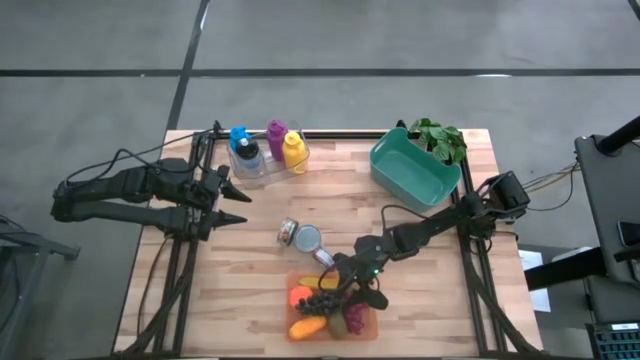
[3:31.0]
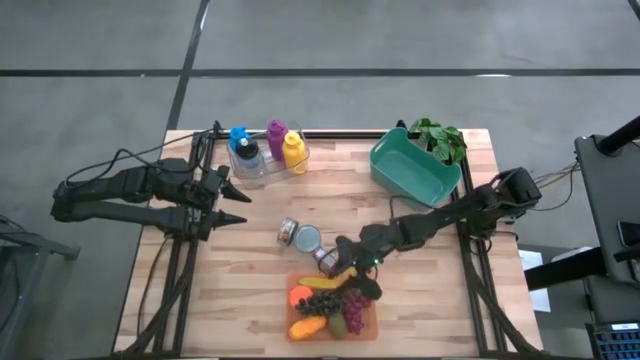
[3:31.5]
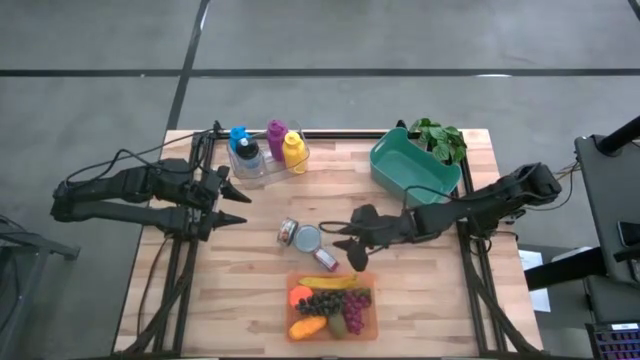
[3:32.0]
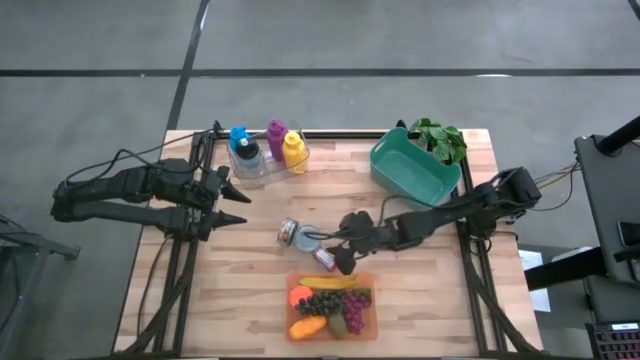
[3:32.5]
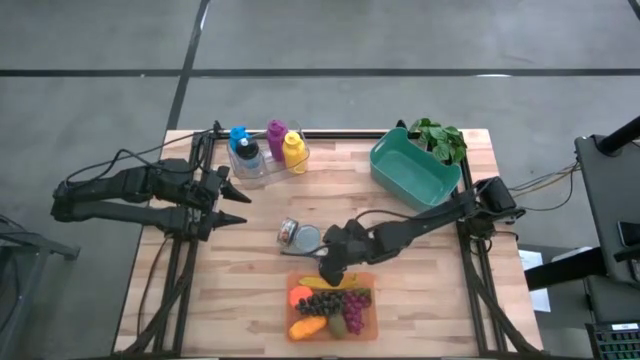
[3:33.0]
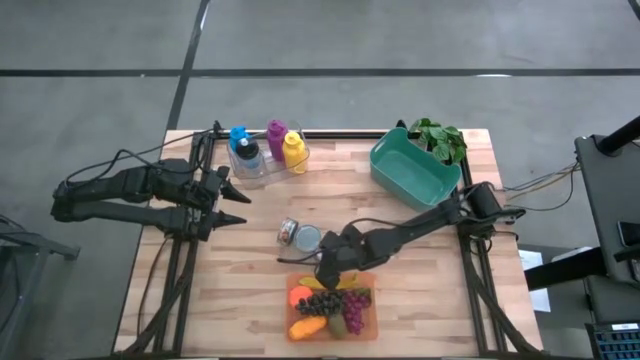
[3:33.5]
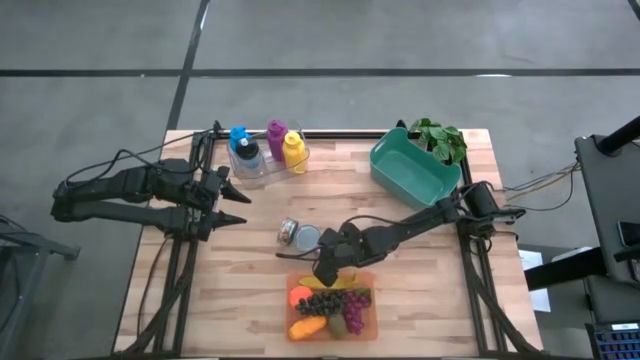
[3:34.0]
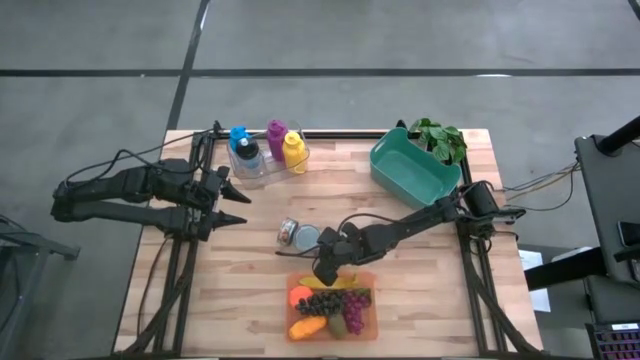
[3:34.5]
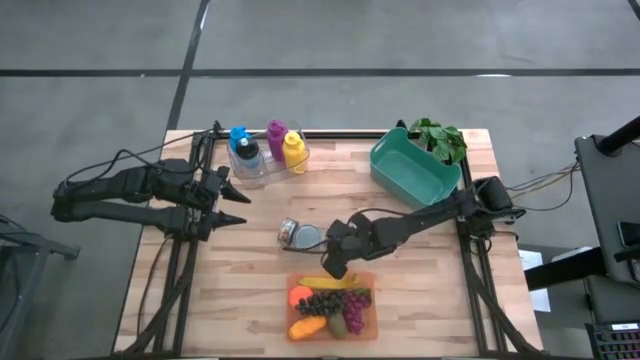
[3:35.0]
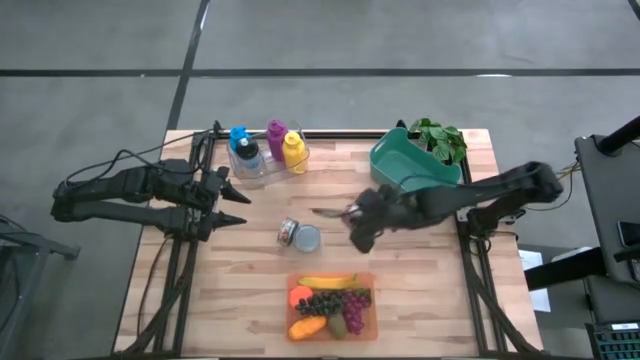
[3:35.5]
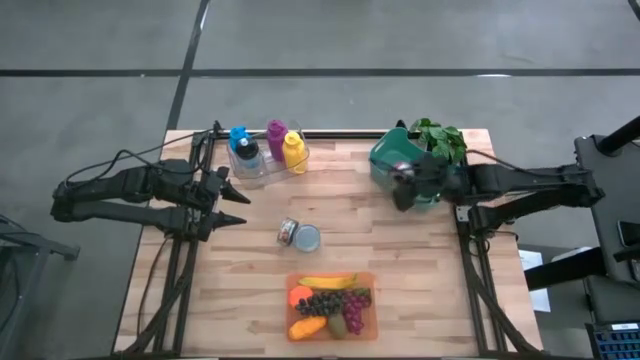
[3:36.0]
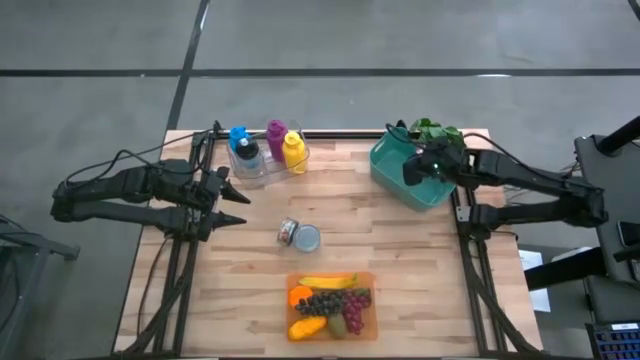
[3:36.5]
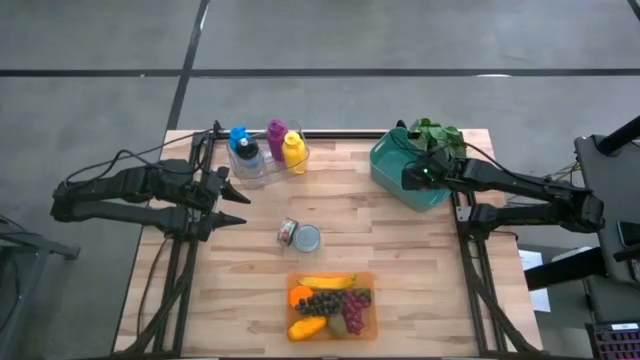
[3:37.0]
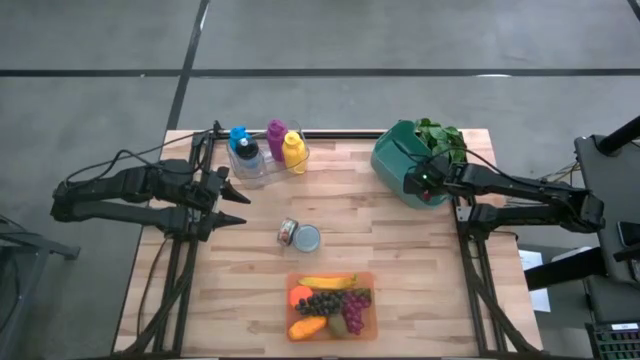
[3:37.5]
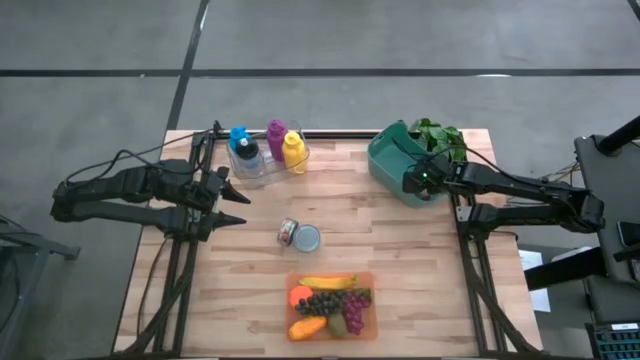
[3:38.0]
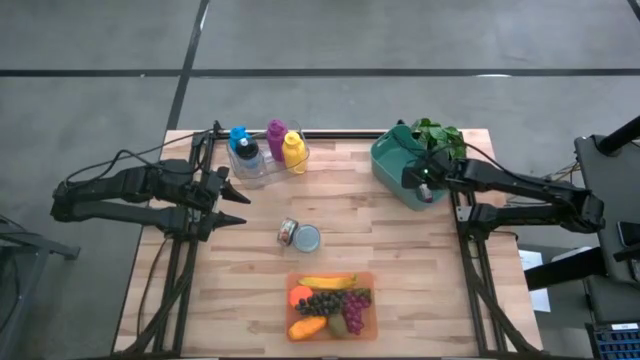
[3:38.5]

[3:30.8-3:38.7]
Task: Pick & Place Food Item
Put the red tuna can into the green bin

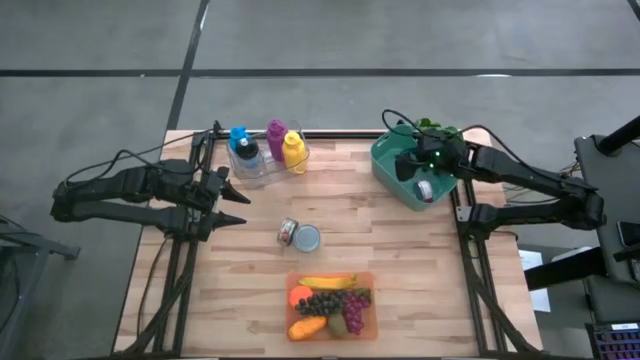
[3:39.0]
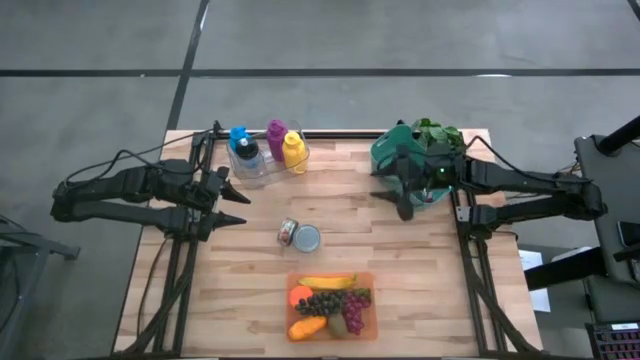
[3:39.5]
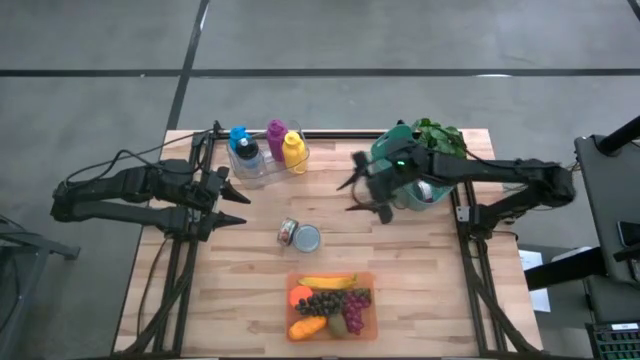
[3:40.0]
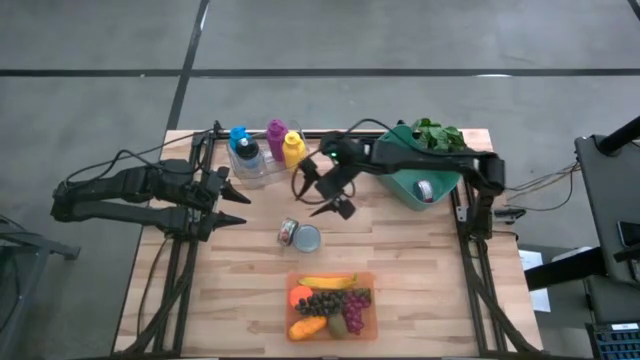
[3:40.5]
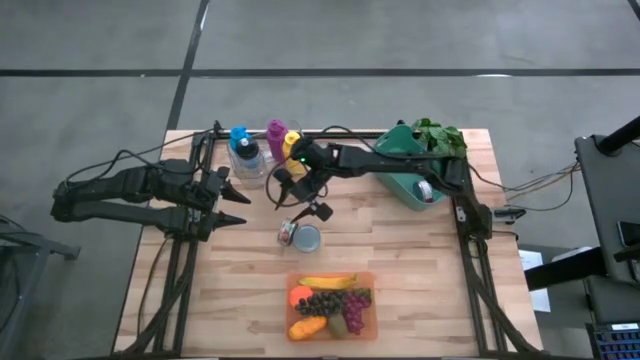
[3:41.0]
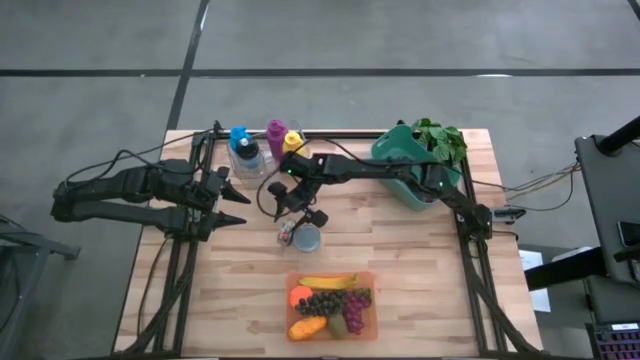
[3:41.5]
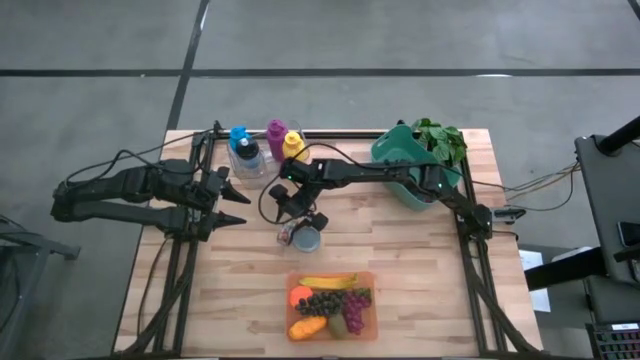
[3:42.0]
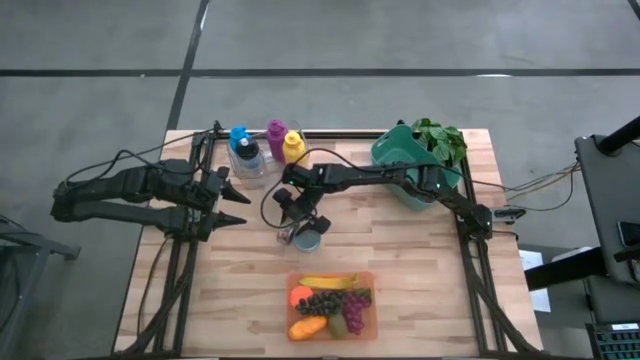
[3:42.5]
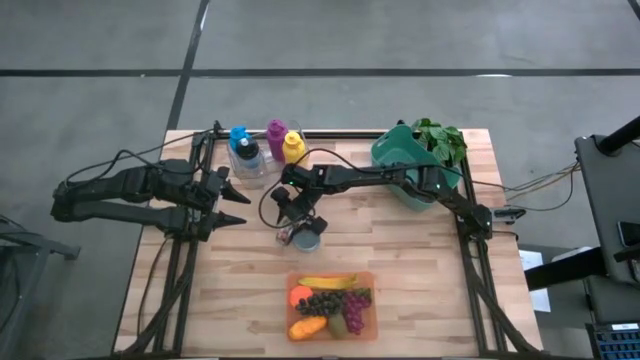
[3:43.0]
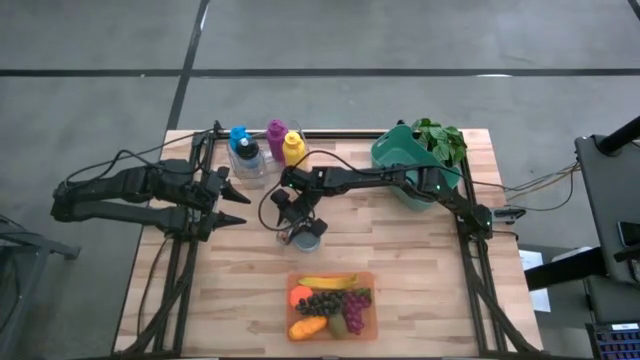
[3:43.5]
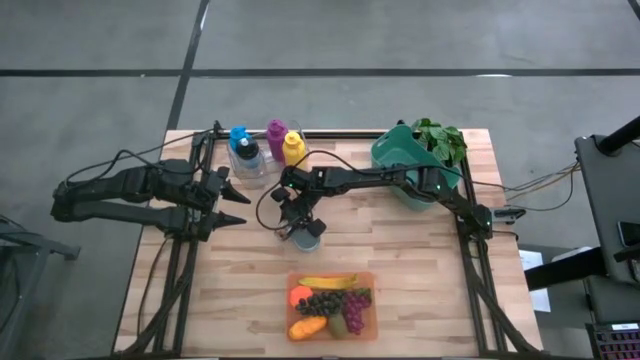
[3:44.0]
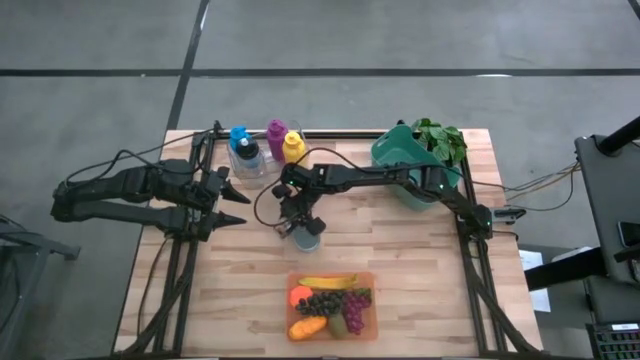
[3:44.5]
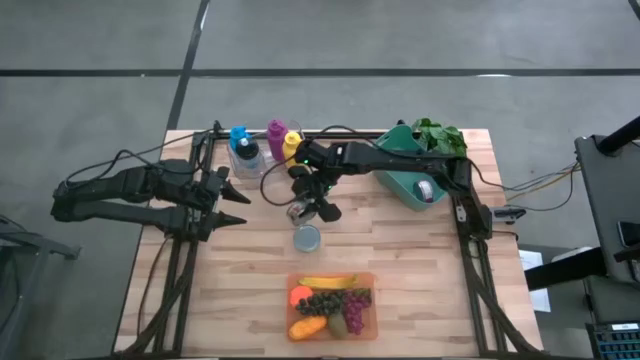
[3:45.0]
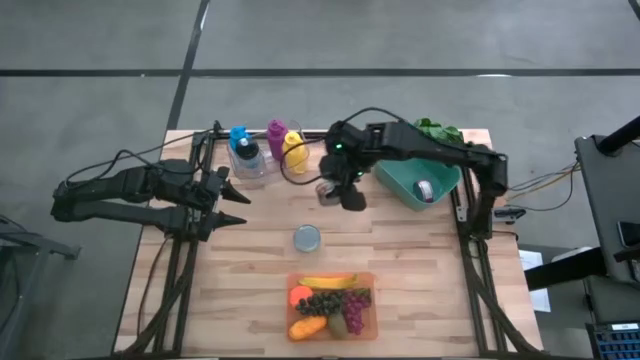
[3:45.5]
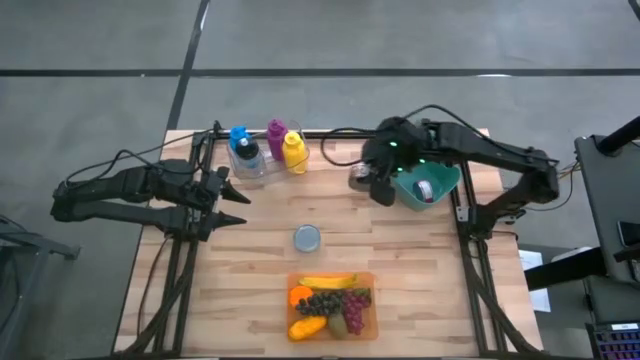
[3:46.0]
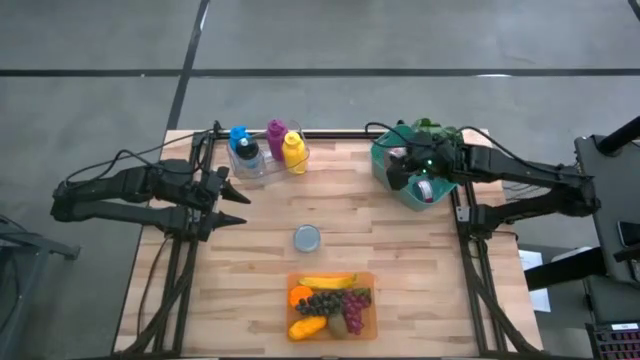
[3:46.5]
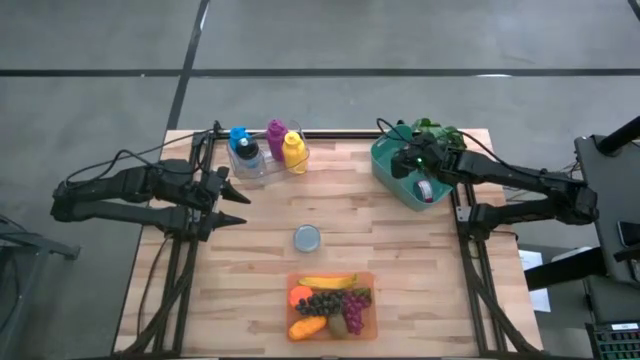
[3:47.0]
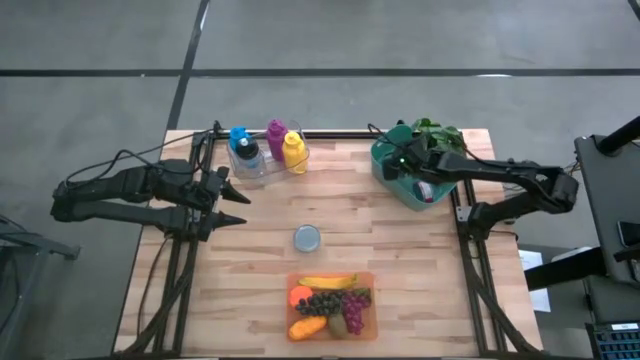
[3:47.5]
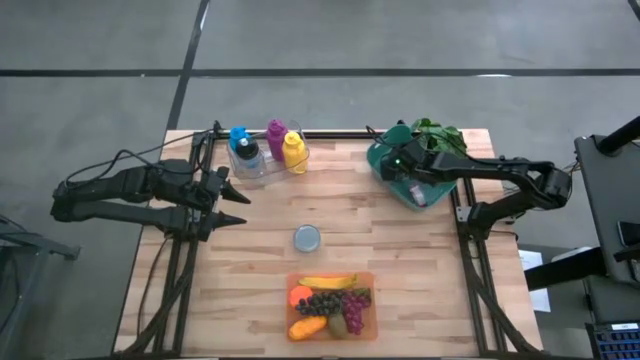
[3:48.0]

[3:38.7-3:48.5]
Put the green tuna can into the green bin
